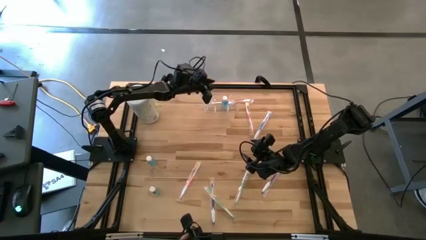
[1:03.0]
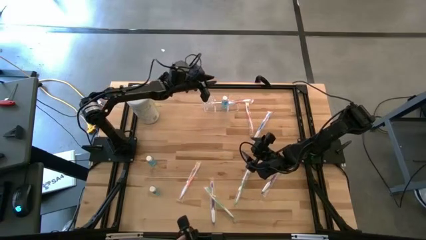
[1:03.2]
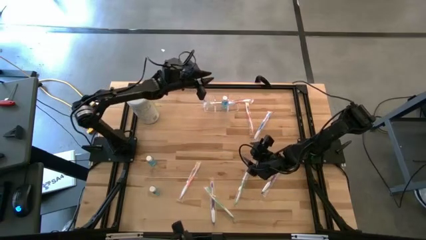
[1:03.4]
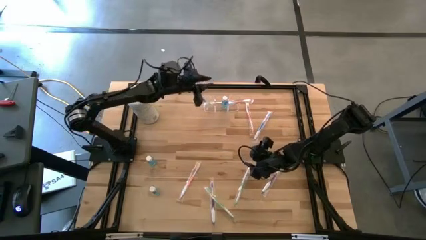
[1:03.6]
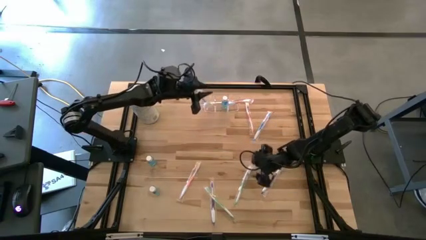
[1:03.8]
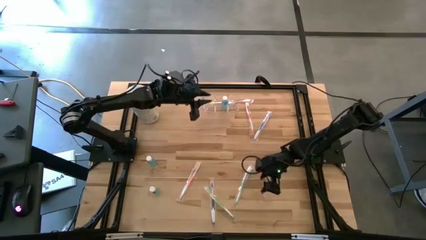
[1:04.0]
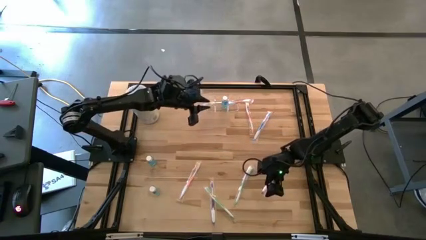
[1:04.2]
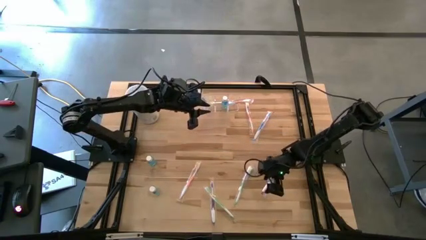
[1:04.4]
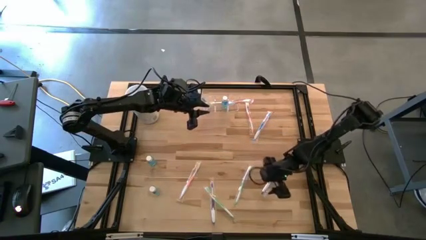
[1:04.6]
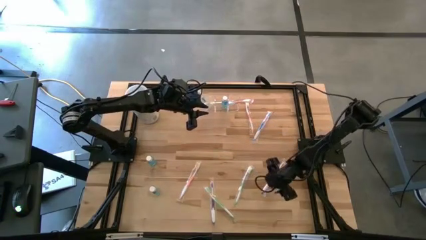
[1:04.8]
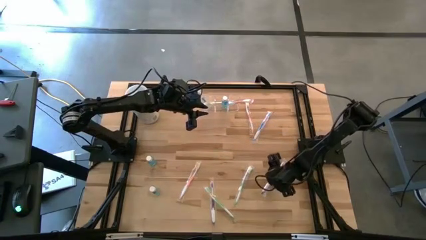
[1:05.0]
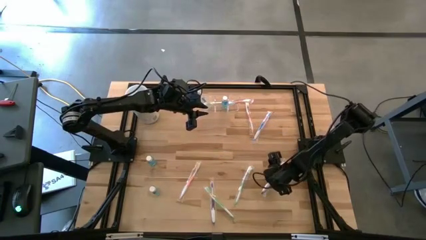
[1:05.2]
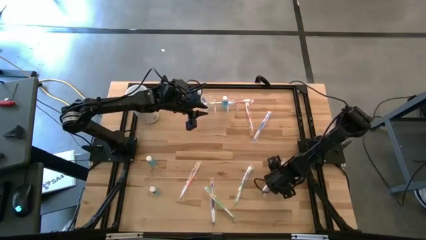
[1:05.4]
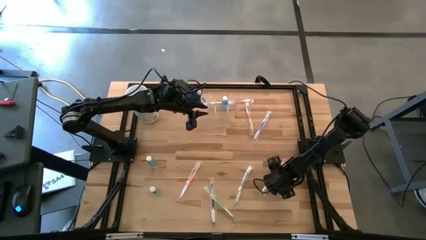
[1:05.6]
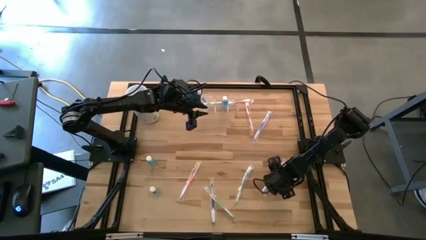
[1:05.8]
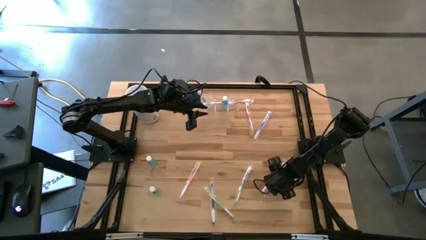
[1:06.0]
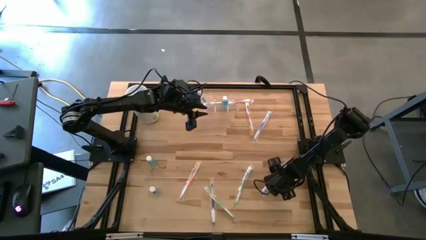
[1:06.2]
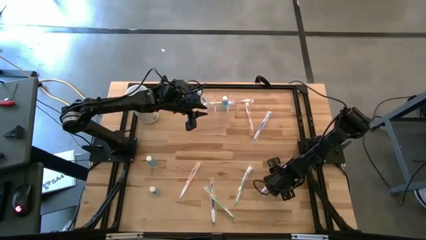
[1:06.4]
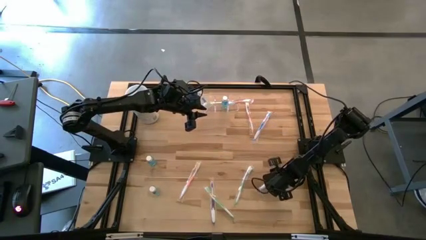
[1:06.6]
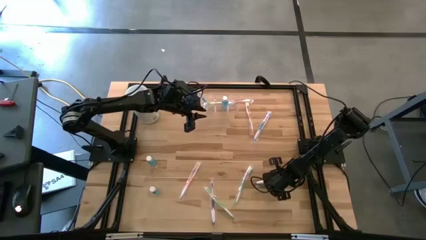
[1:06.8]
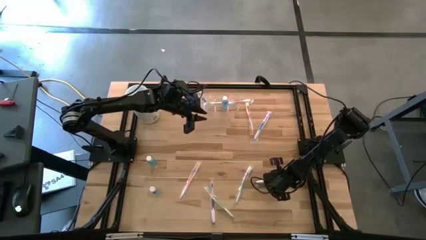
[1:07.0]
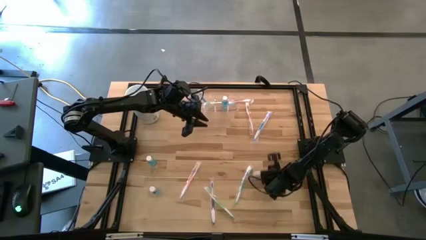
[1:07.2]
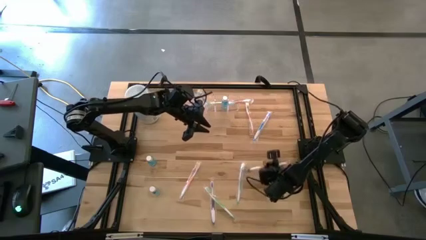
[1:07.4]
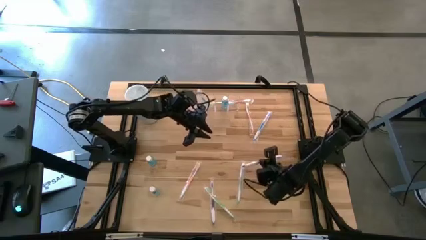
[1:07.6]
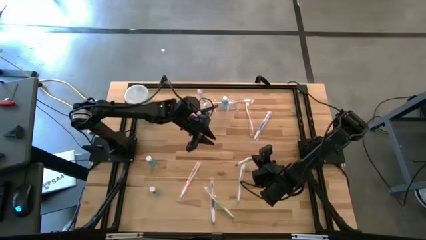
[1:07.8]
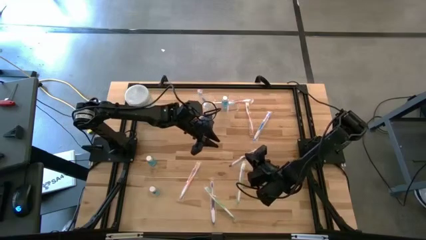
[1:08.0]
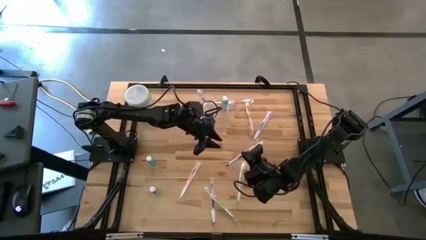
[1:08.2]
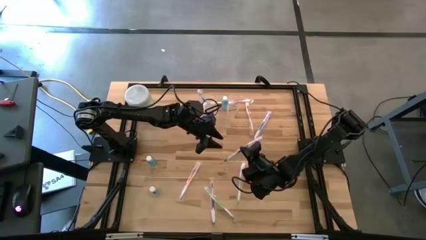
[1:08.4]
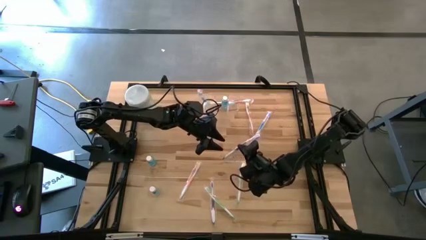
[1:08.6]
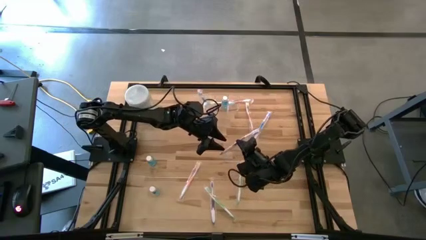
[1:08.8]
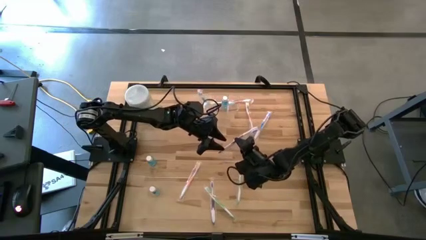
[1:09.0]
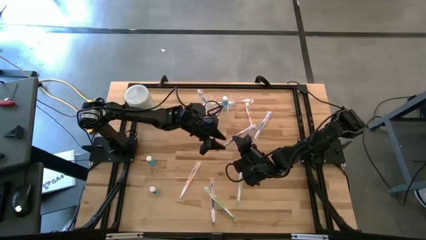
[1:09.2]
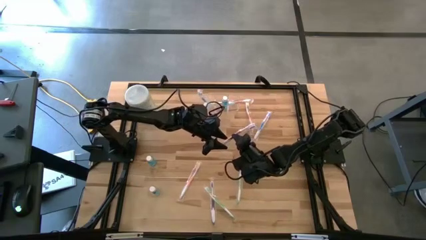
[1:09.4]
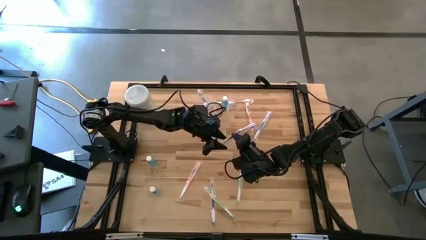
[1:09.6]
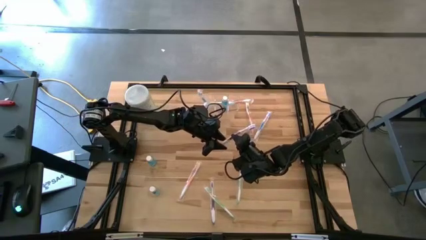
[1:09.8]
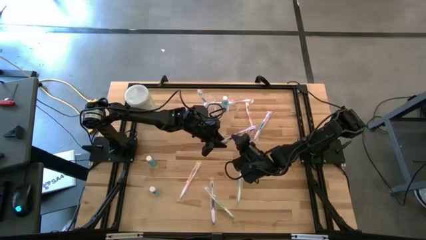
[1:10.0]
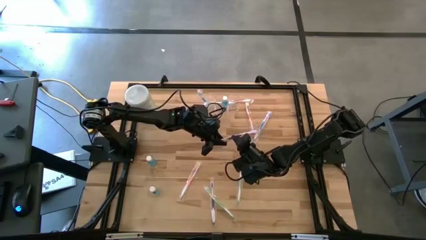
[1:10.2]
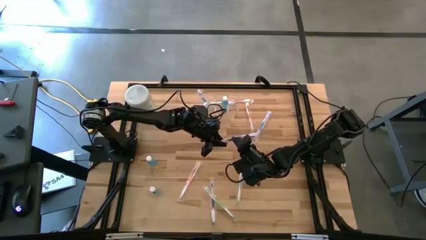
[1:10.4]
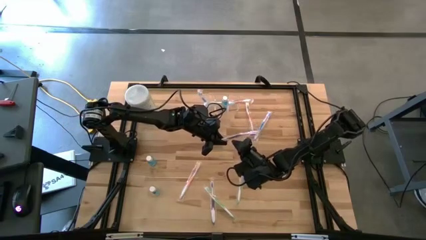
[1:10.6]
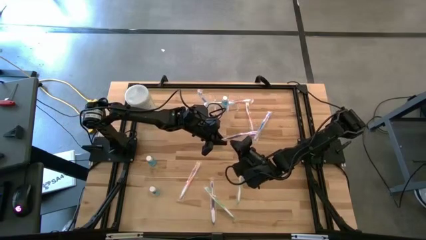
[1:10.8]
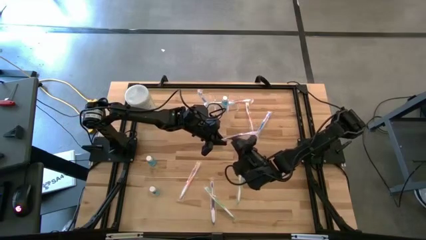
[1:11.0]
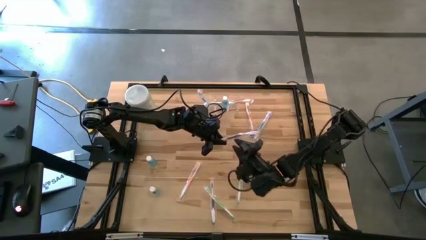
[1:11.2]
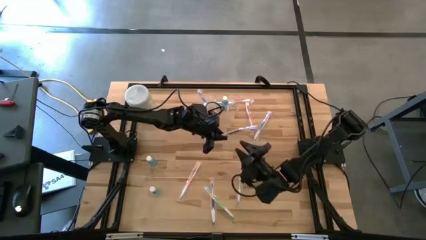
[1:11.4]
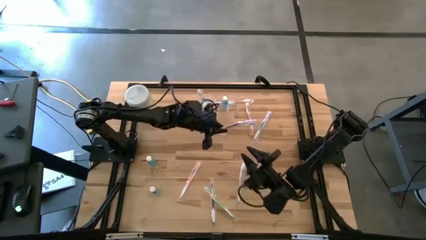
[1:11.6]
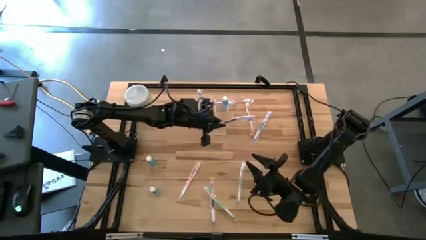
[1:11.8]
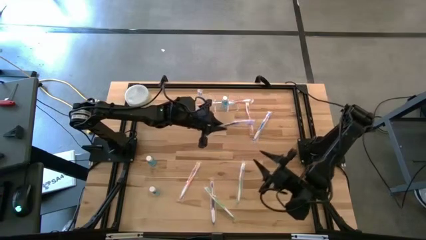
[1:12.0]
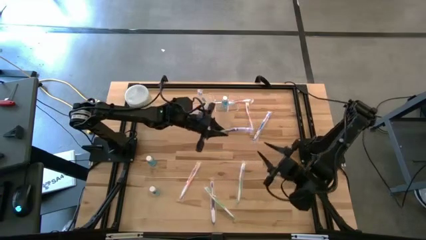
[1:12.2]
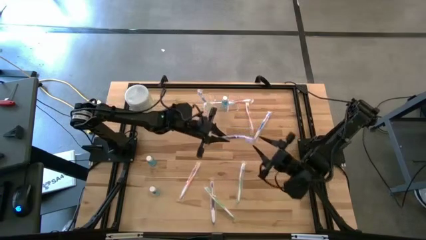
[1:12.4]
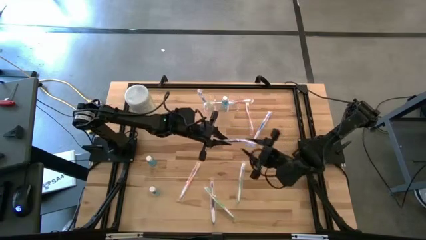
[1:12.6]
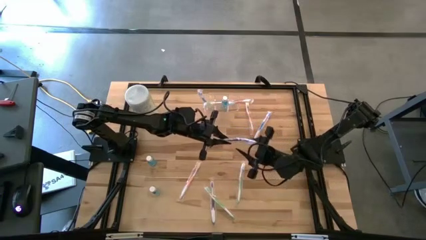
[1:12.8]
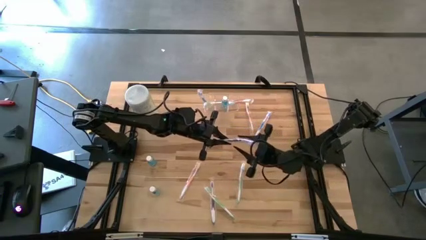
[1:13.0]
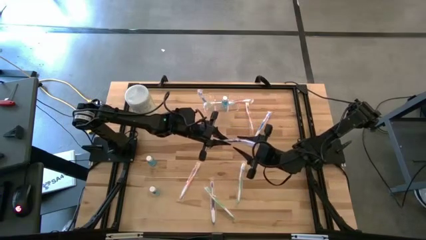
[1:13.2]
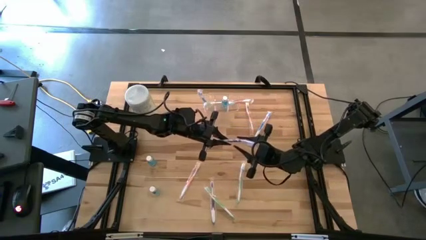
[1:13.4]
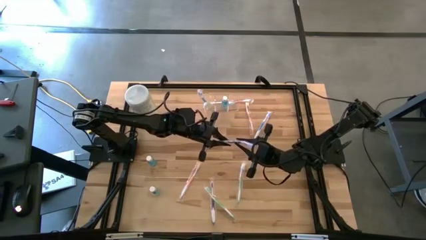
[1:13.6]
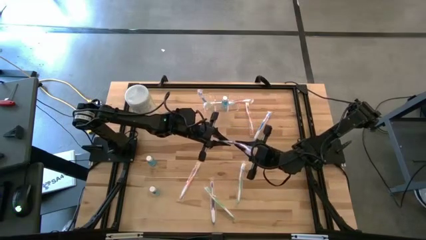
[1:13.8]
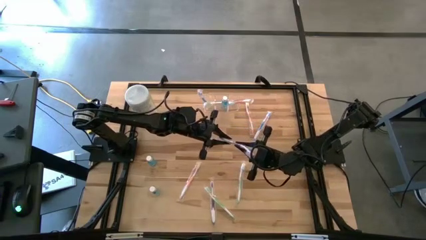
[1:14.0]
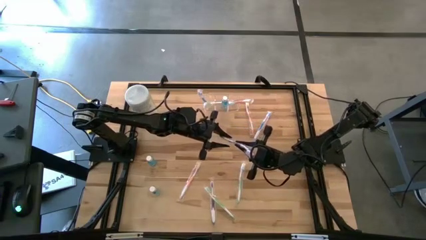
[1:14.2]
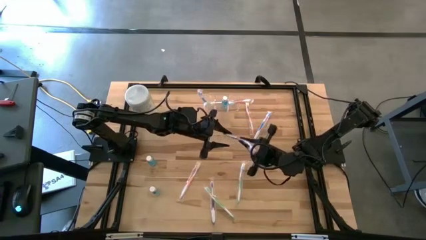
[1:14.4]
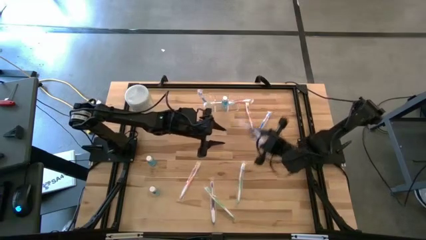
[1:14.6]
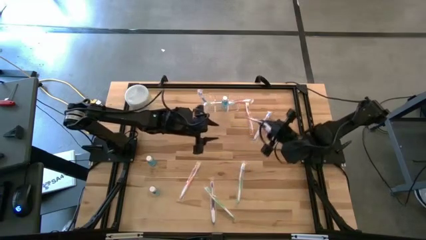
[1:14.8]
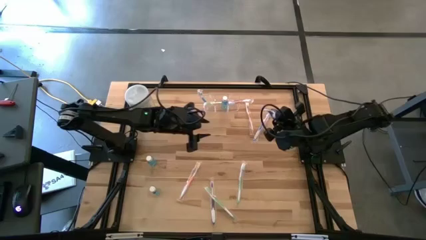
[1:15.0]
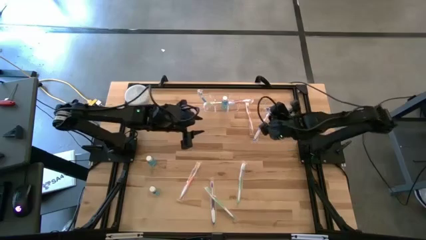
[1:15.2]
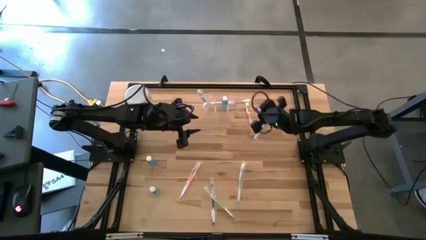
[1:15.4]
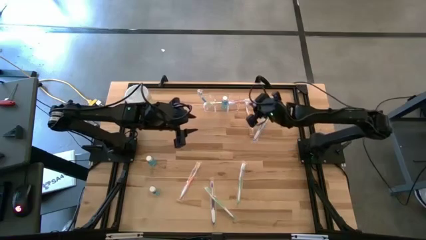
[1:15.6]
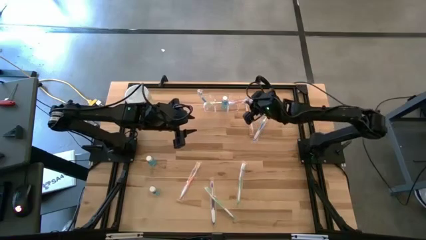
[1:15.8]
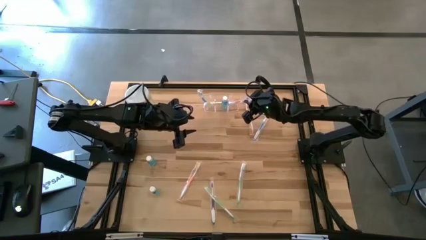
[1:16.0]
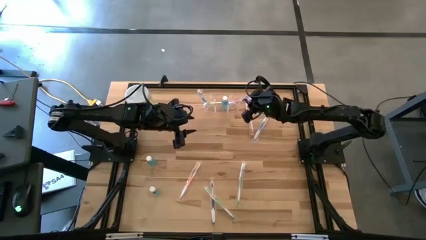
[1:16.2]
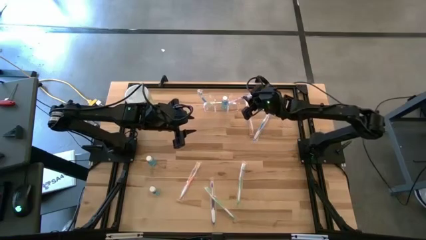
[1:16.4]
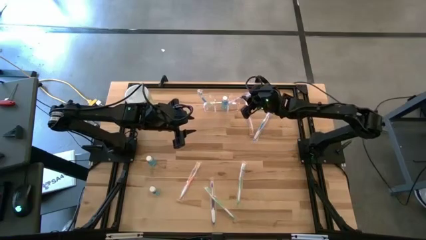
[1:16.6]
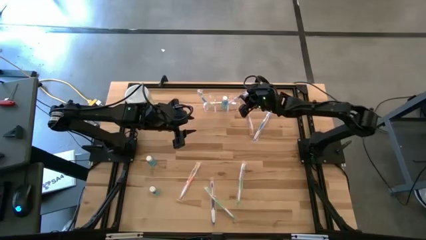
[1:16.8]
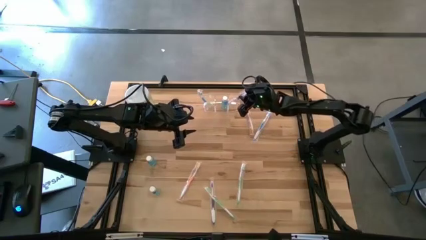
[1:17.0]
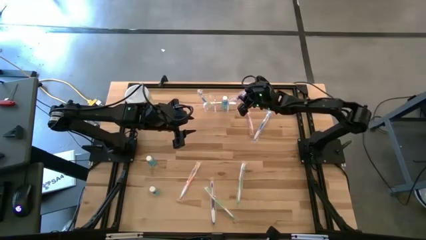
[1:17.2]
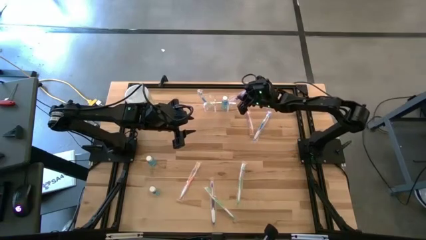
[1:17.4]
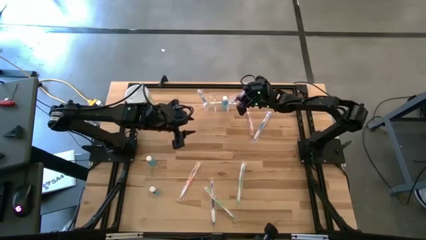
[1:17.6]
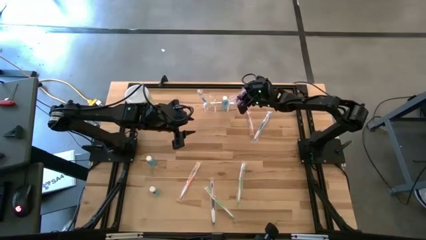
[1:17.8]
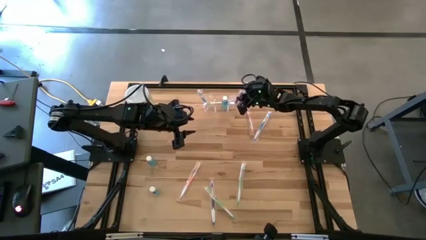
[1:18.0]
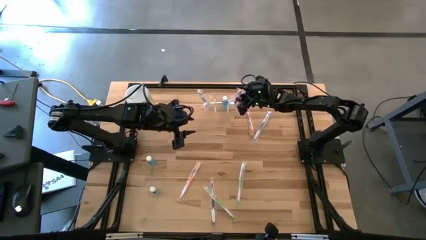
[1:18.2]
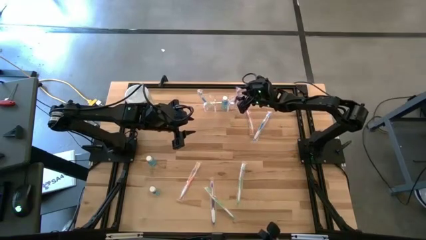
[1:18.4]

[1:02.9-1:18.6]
Task: Pick & Place toothbrushing station
Put the right purple toothbrush into the transparent organizer
